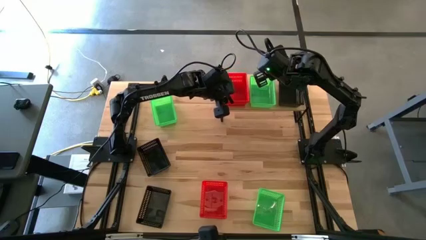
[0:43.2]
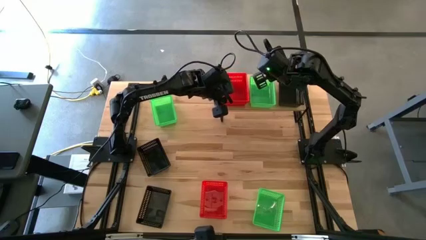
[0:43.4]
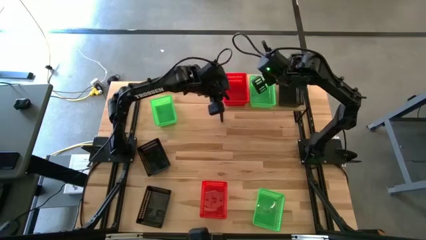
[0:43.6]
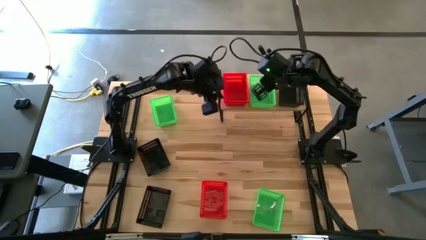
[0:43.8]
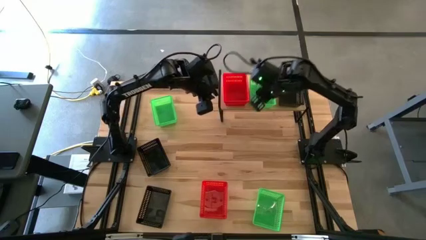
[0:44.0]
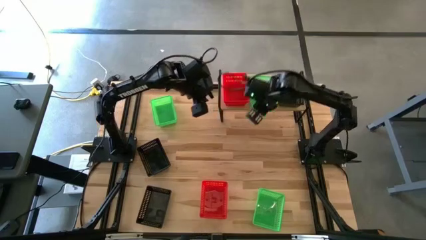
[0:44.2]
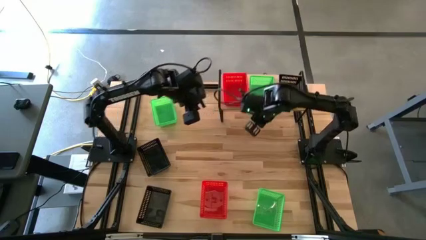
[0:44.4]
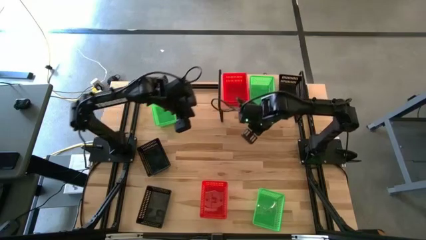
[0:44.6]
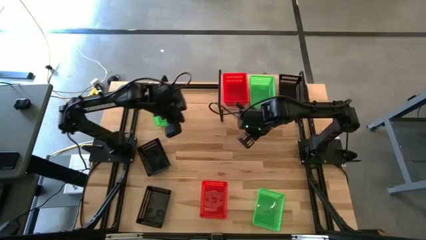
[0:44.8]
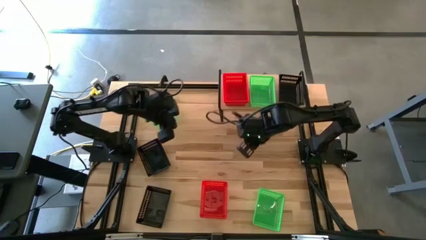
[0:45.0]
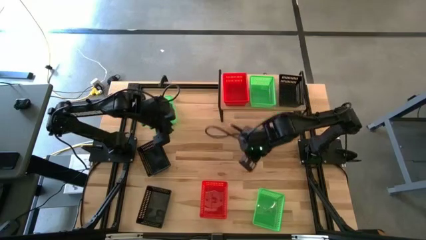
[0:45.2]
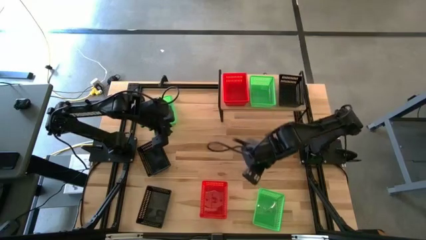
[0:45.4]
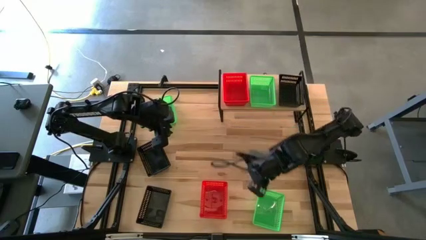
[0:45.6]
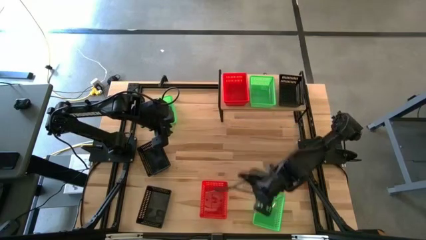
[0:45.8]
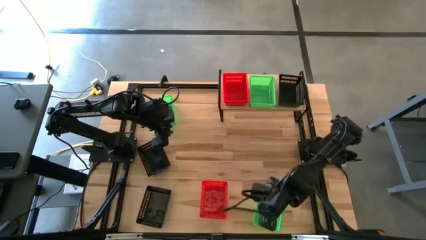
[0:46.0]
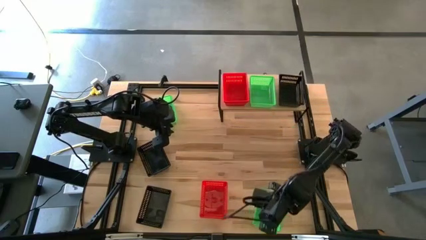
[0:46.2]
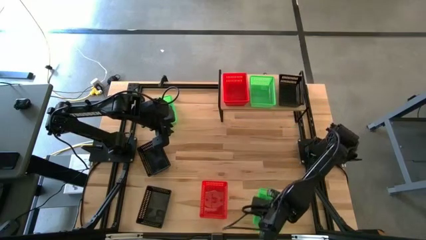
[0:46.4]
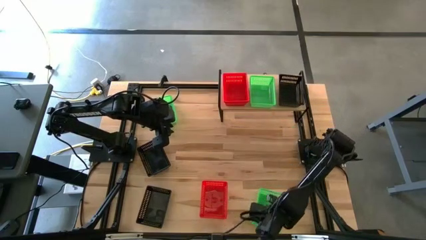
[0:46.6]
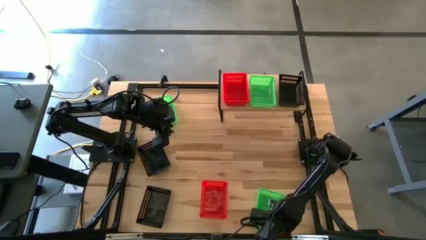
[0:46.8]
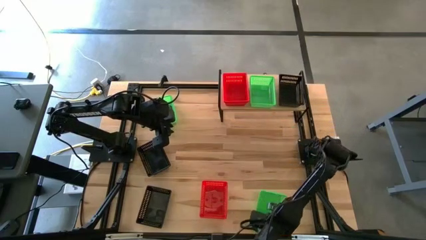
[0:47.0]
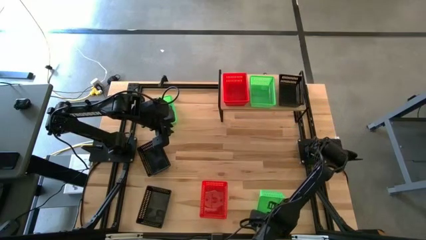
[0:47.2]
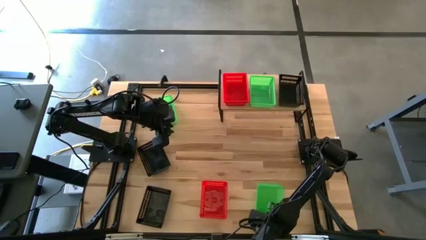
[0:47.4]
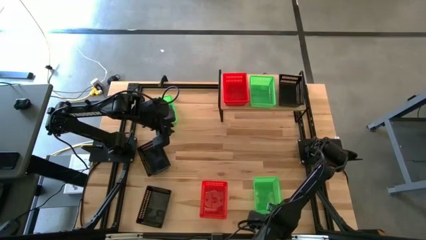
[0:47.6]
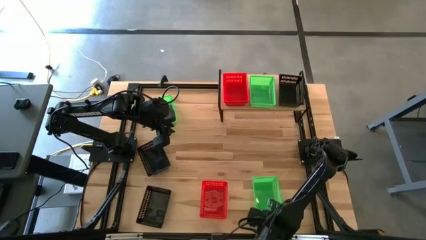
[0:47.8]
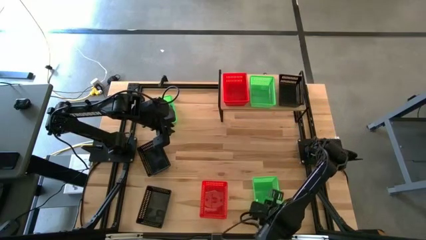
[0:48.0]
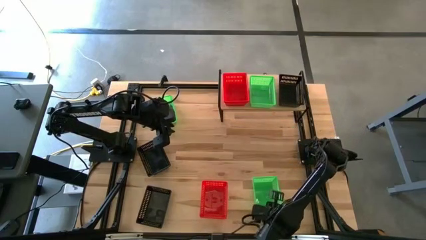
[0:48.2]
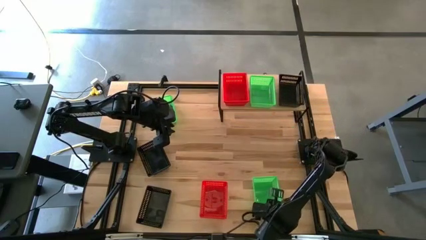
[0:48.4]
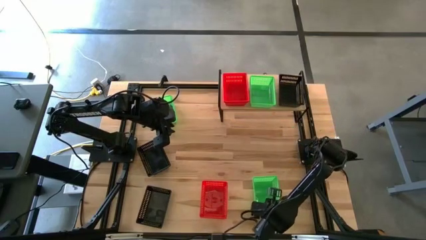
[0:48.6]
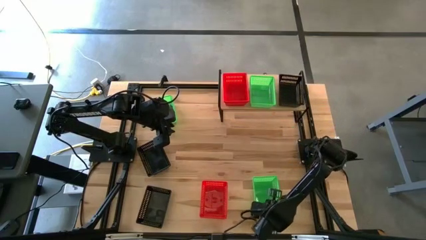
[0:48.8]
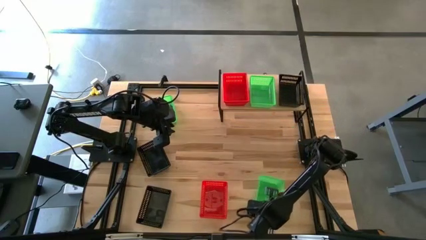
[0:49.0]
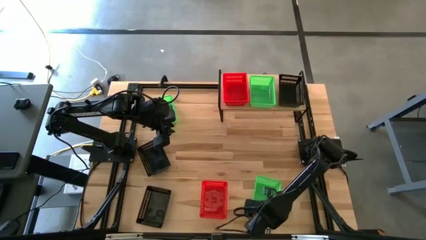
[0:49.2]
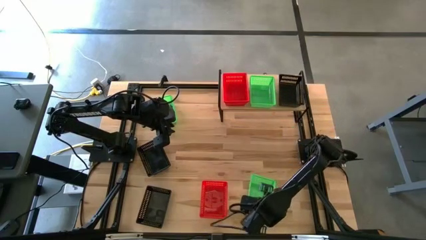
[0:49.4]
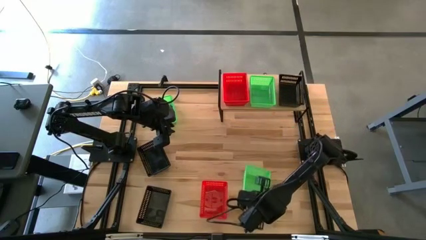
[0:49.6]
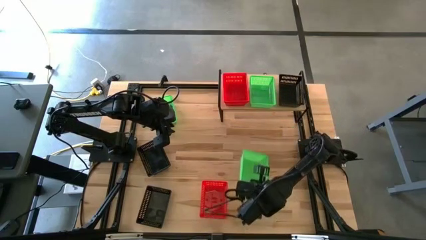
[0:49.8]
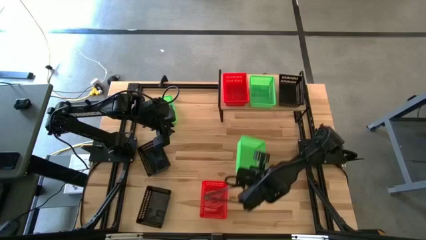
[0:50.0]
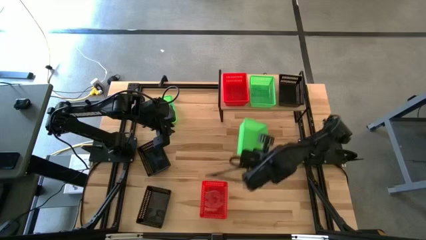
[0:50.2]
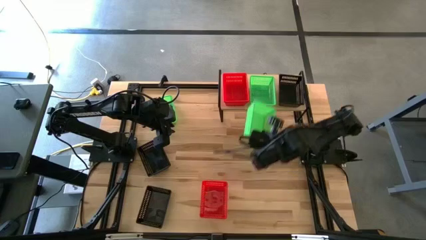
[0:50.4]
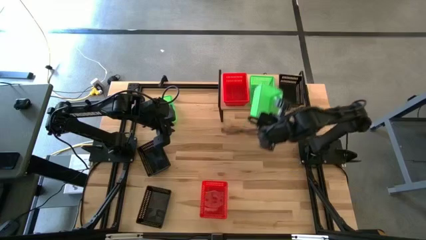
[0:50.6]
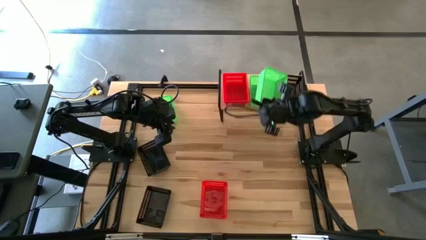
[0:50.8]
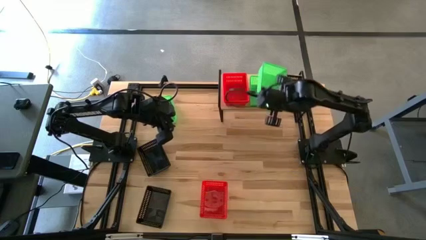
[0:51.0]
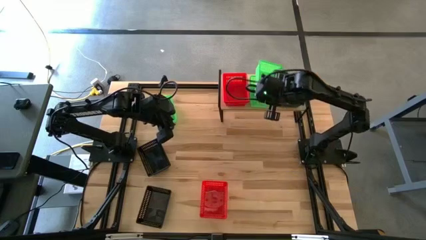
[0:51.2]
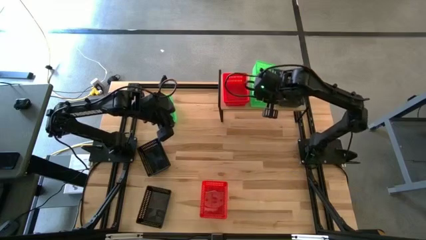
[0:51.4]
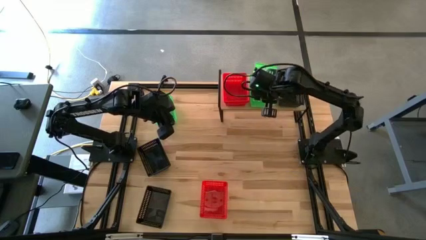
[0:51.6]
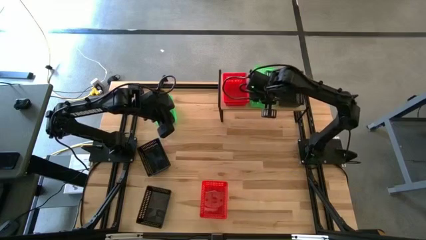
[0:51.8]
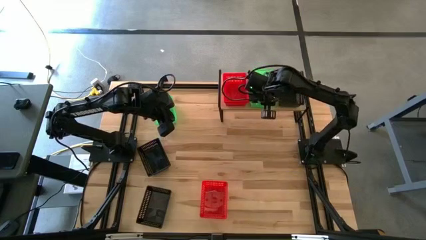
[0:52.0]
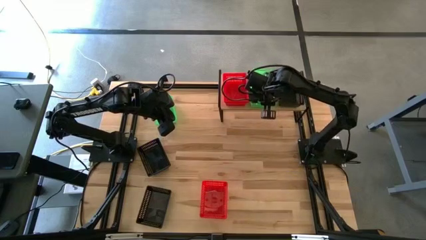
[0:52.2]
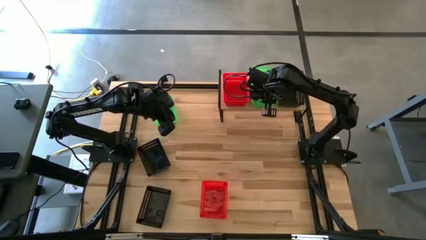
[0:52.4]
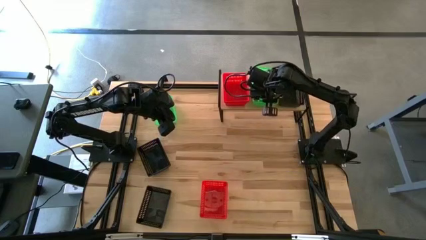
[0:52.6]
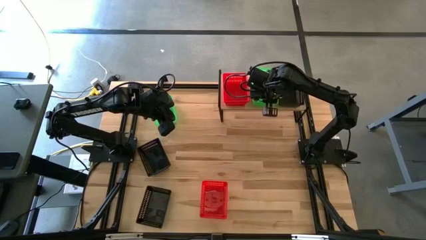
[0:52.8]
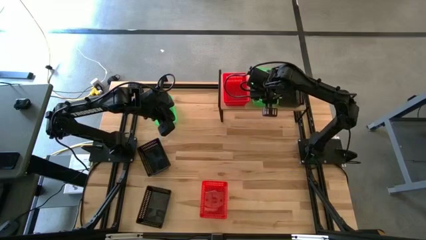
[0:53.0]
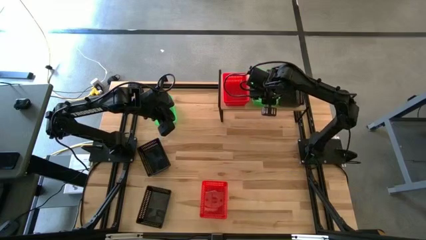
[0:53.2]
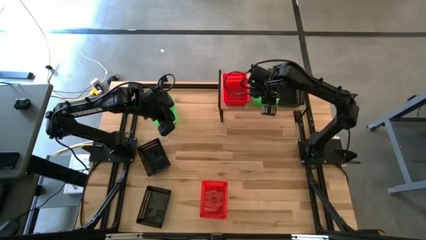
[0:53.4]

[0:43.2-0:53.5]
Task: Stack baskets on shelf by color
Stack the bottom green bin on top of the green bin
